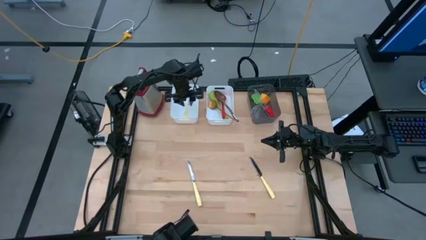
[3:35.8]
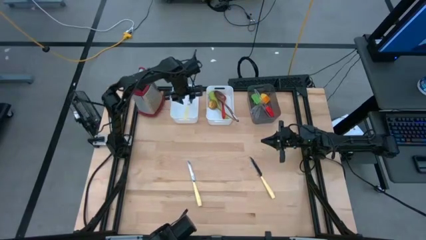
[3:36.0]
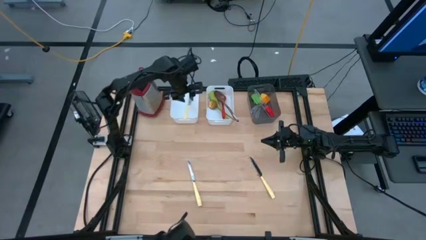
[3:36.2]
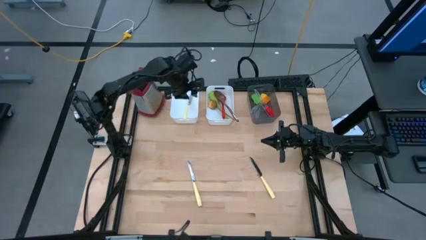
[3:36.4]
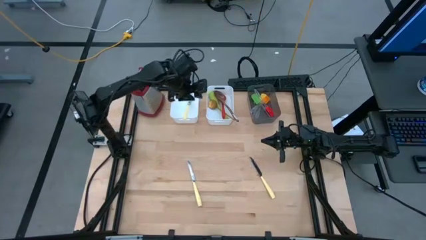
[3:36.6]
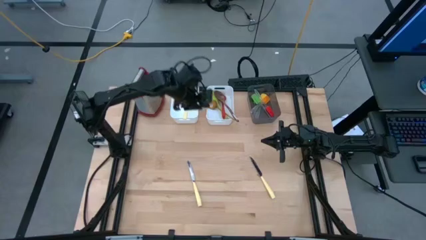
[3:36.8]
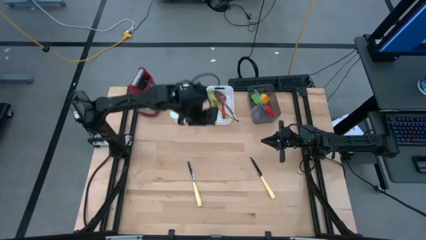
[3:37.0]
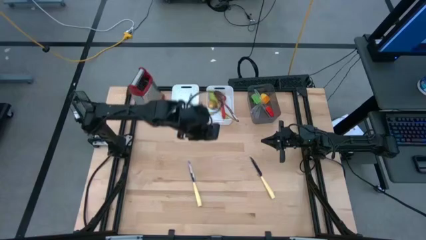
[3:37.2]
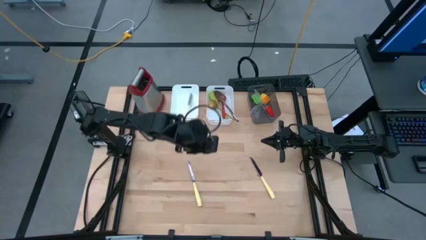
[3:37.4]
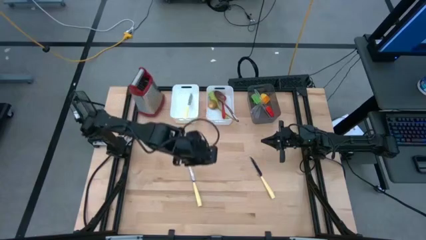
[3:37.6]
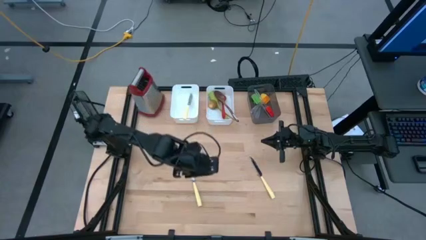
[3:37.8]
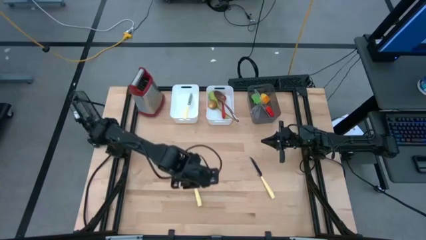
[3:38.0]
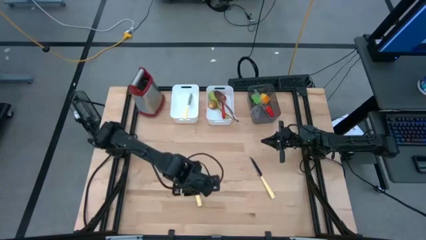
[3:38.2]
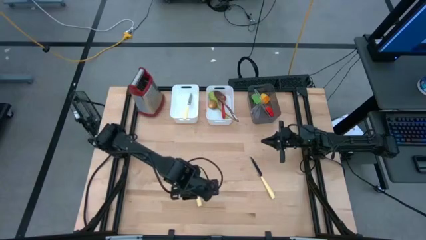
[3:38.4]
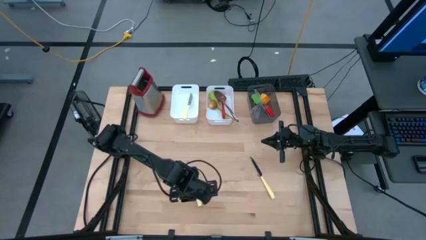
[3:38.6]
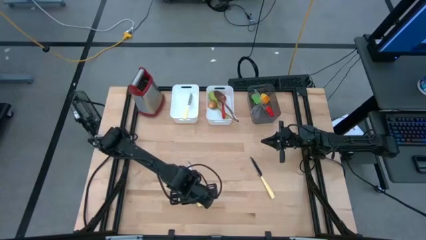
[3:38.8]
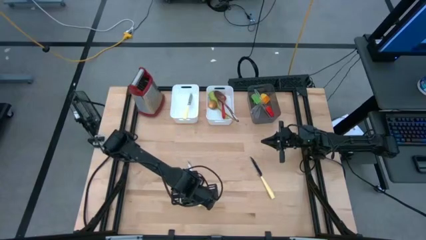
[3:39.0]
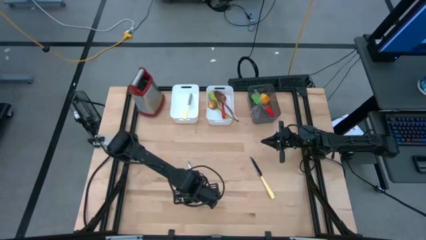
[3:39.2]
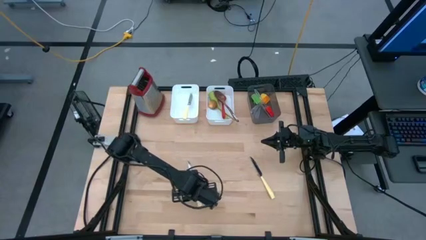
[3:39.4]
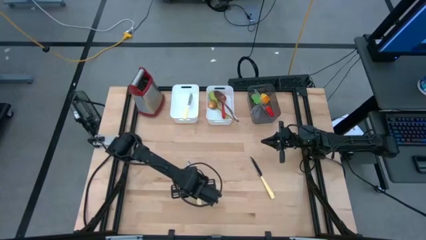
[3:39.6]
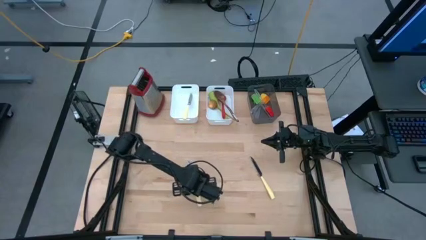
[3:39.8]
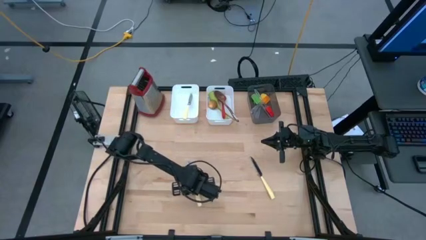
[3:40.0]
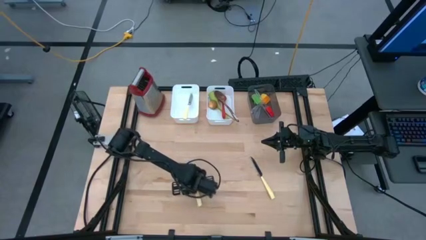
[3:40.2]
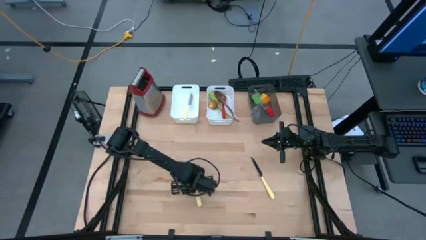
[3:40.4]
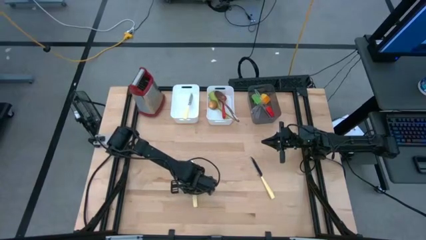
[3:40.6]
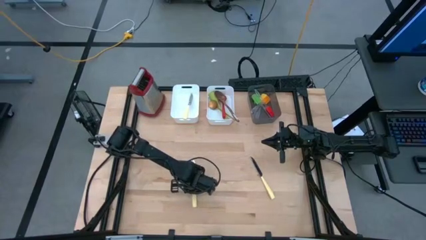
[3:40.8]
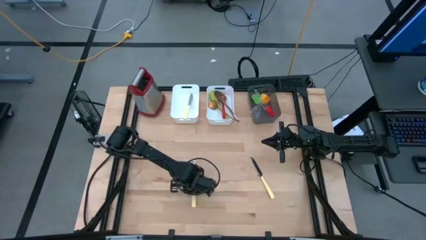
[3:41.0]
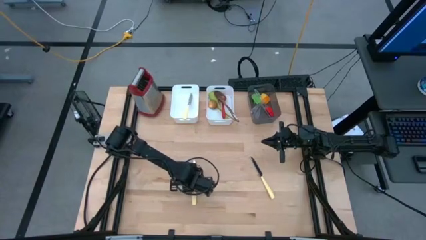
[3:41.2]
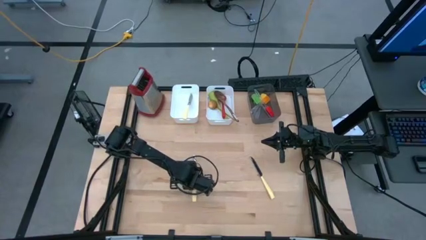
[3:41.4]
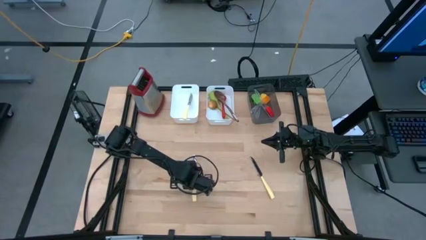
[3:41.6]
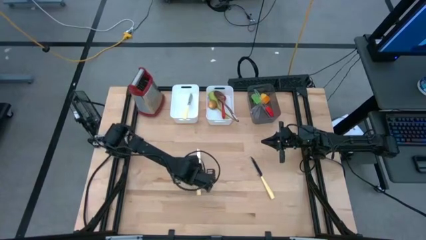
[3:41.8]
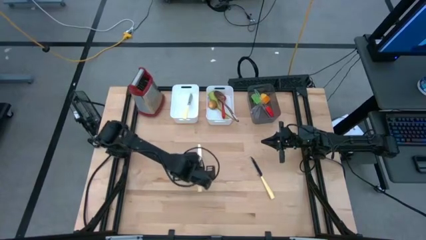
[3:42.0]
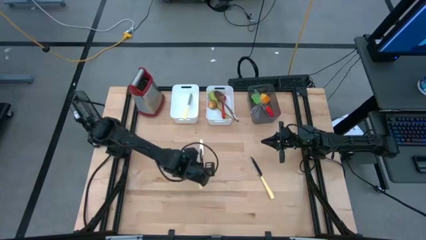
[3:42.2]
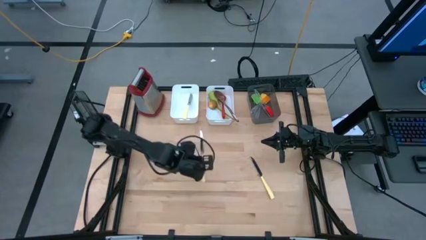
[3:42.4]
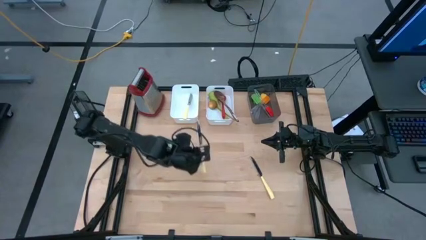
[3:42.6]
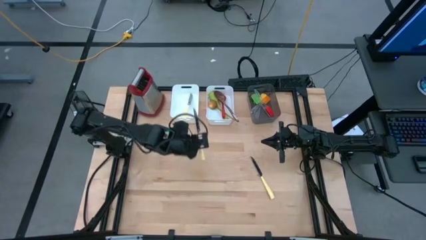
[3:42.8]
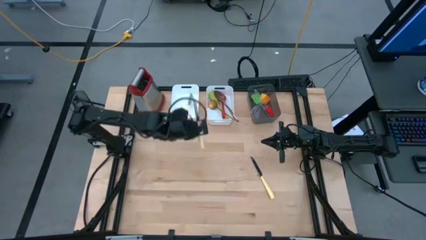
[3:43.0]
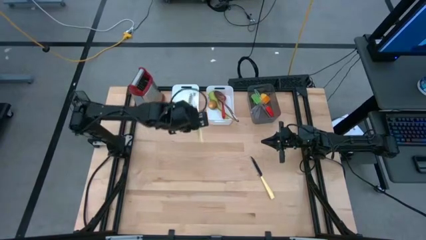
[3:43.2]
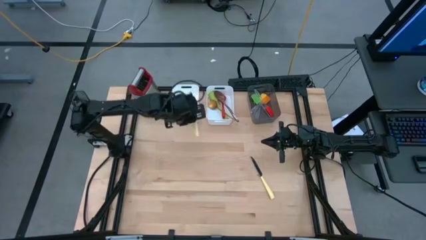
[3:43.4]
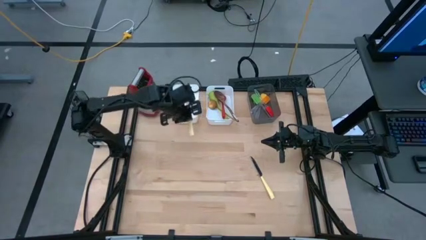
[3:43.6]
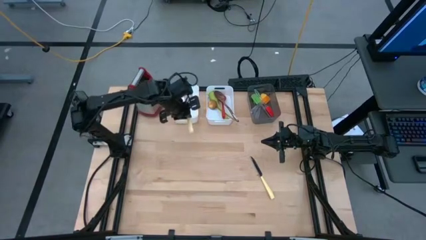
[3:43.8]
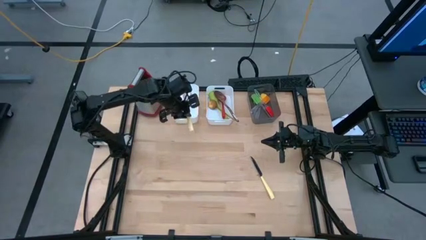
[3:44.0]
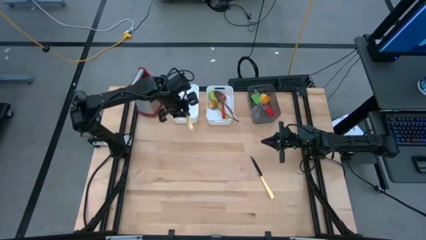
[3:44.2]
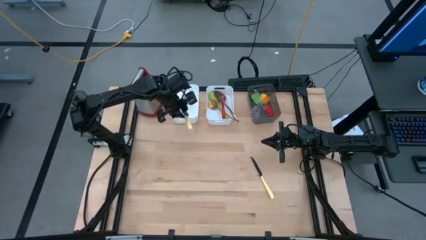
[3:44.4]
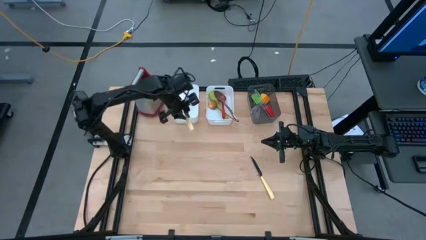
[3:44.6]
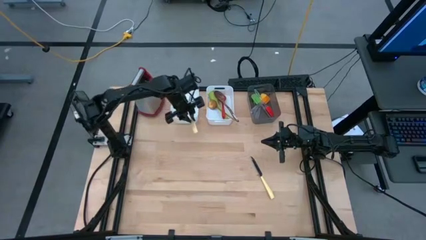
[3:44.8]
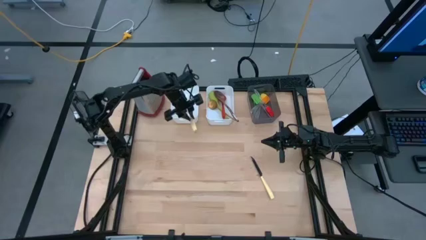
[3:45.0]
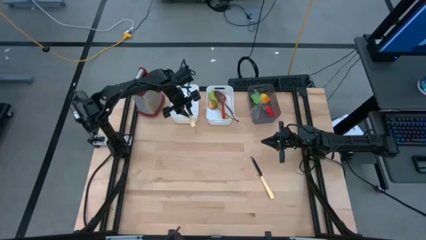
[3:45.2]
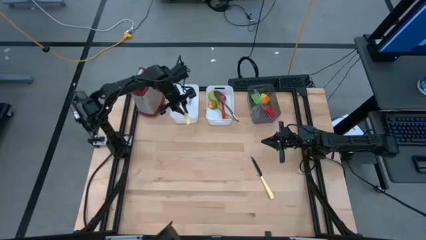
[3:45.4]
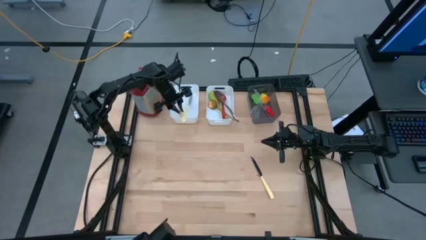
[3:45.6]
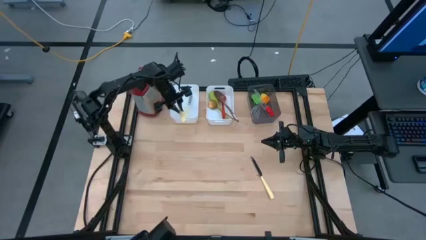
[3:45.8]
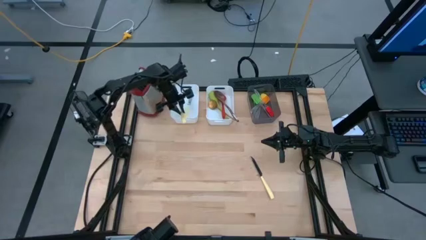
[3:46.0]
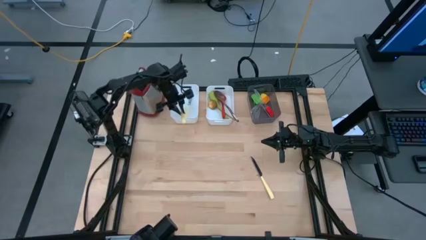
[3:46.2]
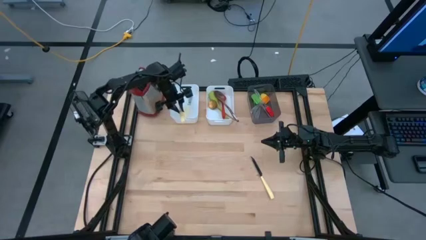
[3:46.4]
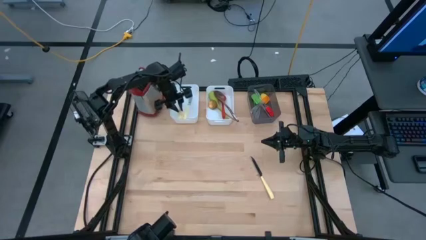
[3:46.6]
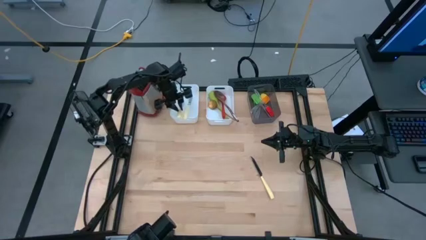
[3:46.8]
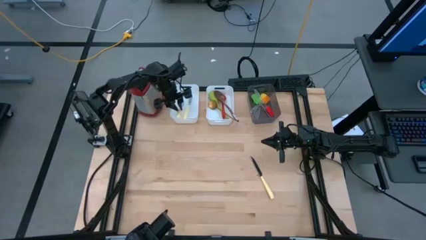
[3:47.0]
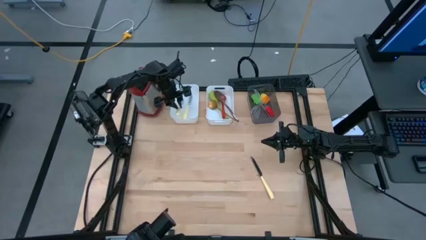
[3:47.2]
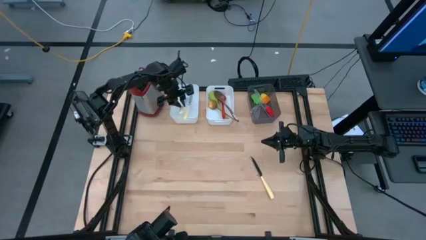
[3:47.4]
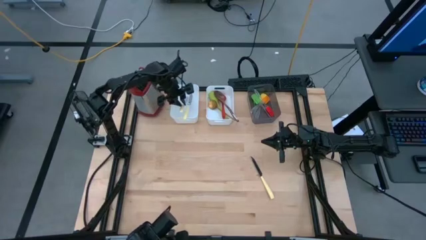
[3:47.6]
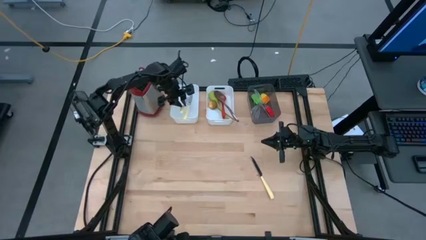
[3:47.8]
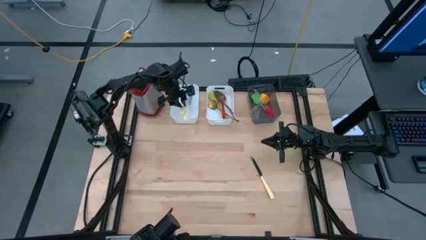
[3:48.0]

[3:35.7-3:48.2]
Task: Pick & Place Kitchen Items
Put the yellow table knife into the left white bin
